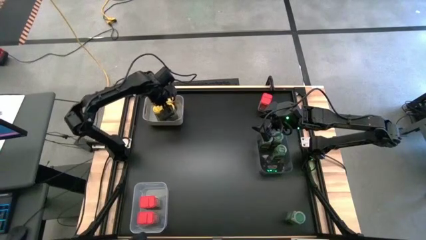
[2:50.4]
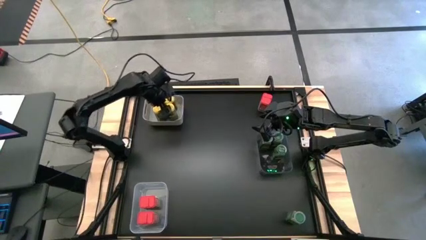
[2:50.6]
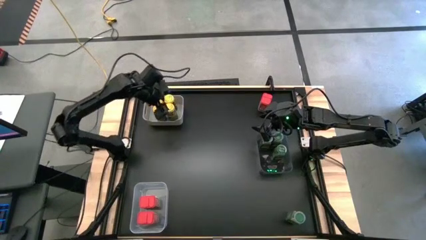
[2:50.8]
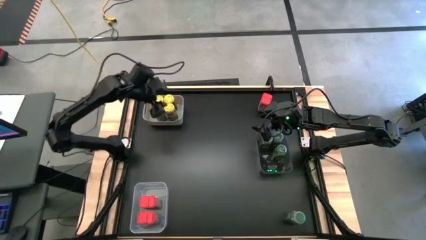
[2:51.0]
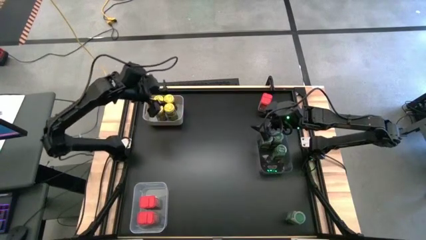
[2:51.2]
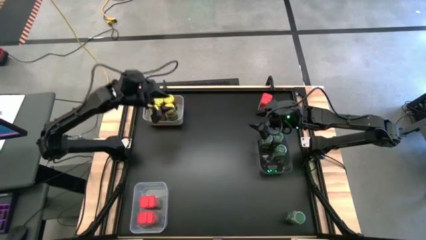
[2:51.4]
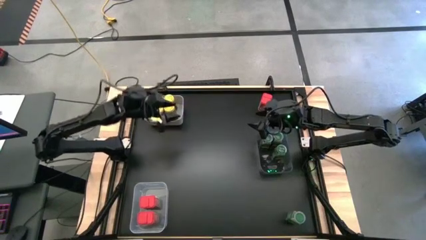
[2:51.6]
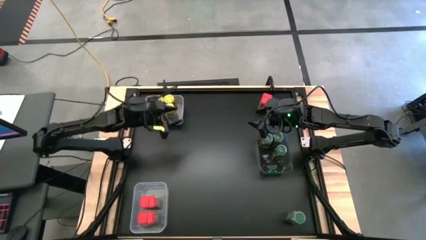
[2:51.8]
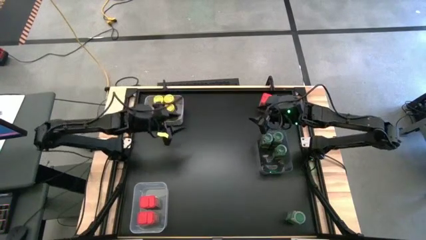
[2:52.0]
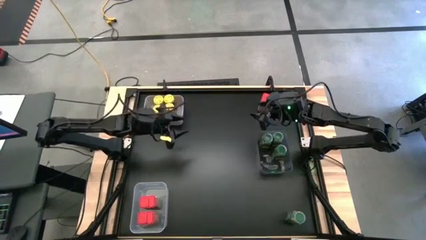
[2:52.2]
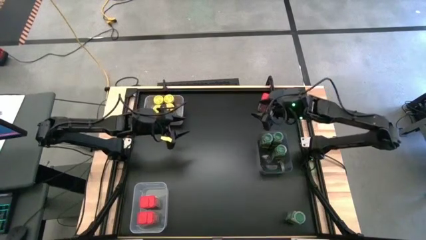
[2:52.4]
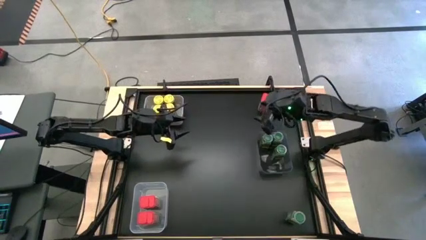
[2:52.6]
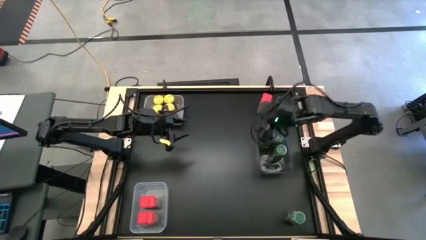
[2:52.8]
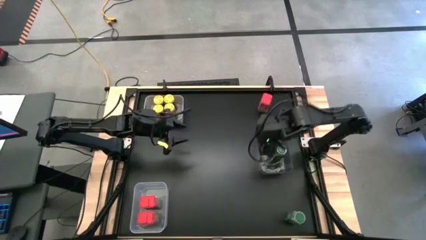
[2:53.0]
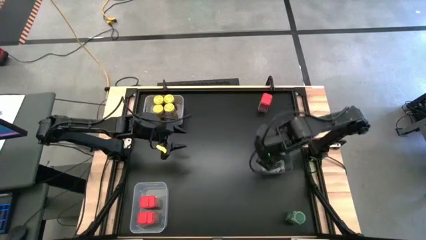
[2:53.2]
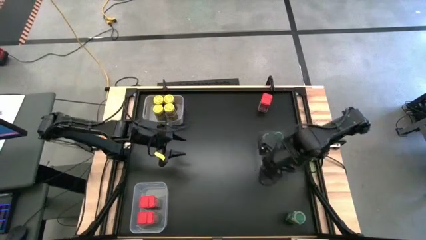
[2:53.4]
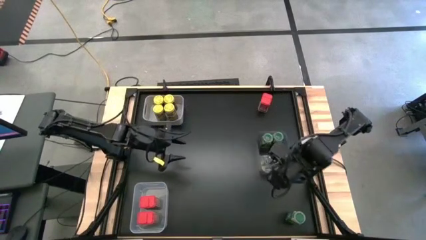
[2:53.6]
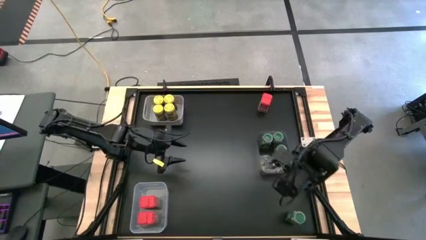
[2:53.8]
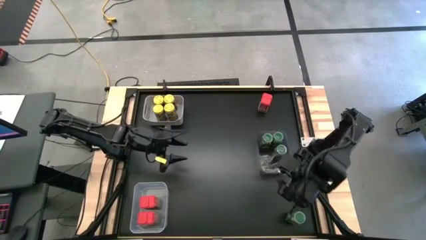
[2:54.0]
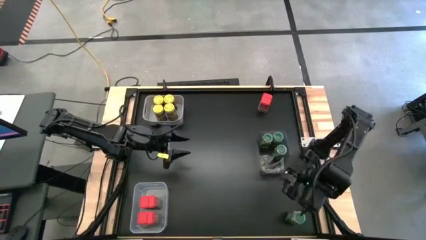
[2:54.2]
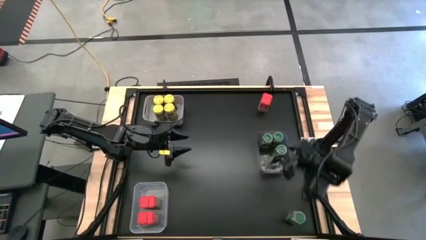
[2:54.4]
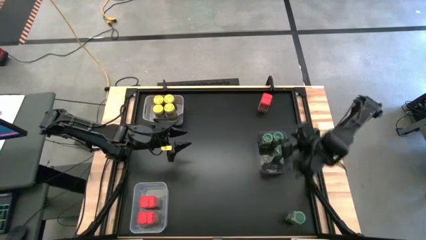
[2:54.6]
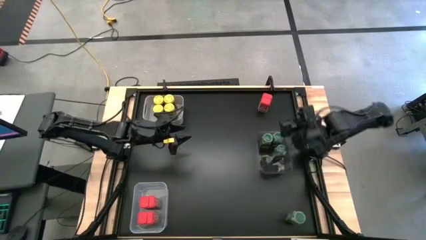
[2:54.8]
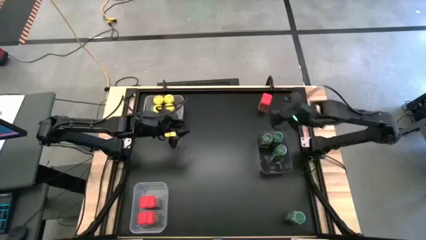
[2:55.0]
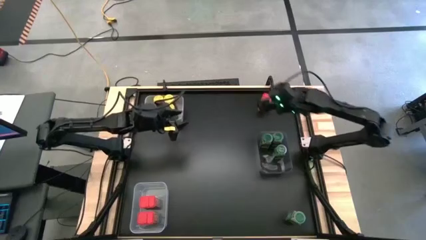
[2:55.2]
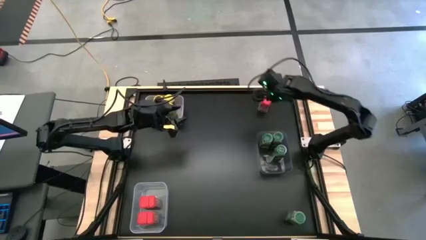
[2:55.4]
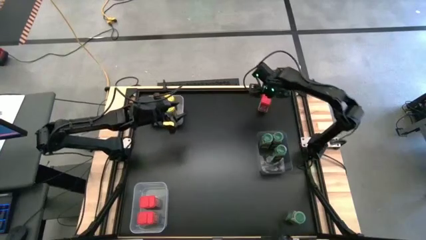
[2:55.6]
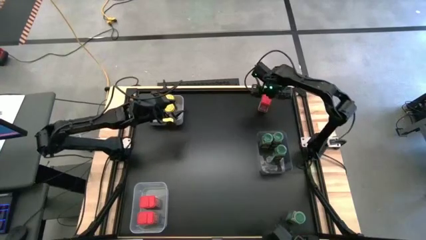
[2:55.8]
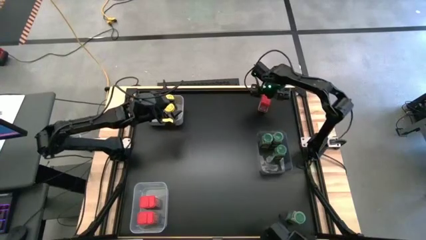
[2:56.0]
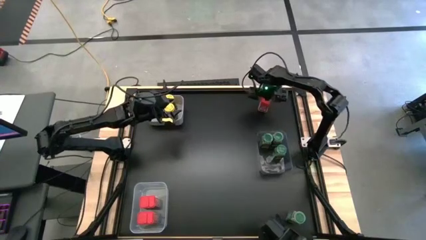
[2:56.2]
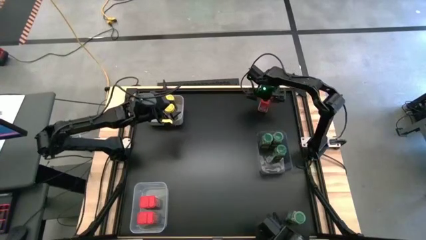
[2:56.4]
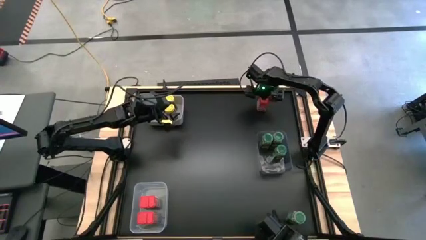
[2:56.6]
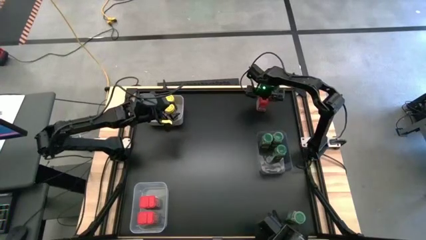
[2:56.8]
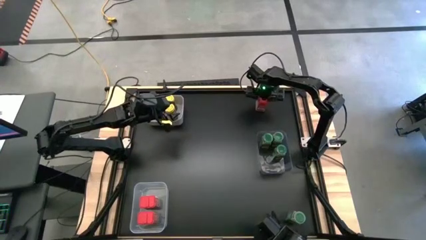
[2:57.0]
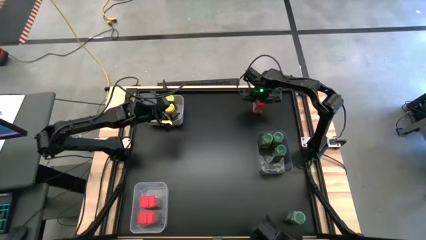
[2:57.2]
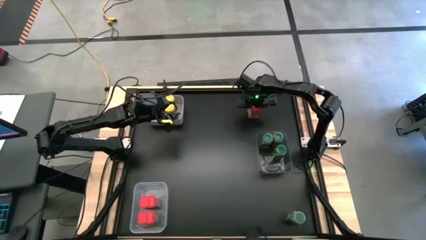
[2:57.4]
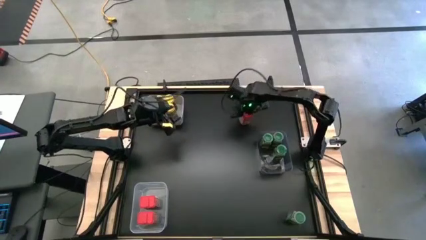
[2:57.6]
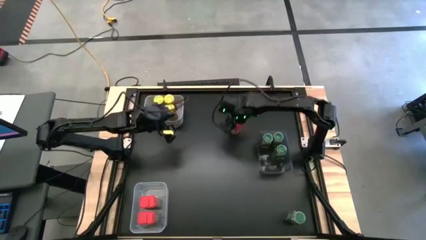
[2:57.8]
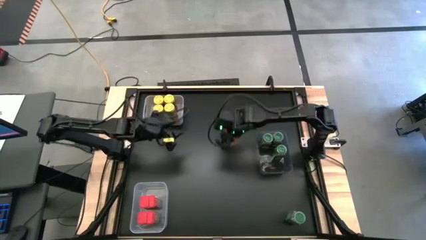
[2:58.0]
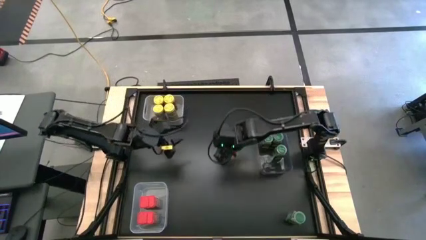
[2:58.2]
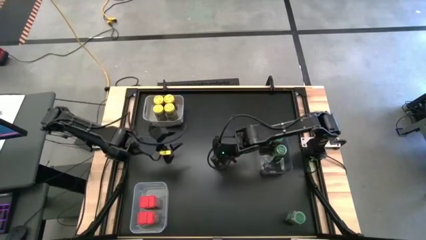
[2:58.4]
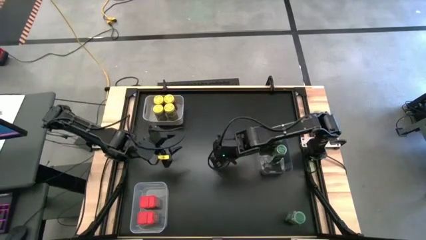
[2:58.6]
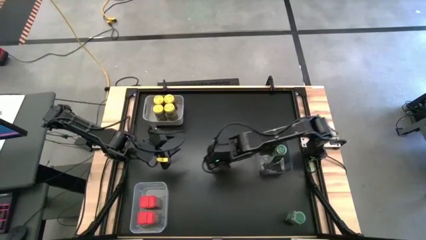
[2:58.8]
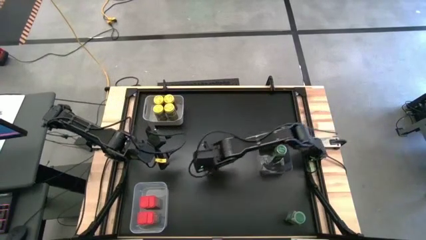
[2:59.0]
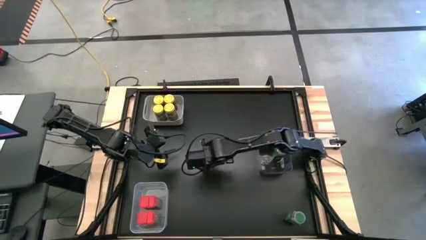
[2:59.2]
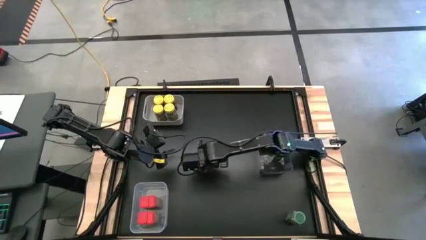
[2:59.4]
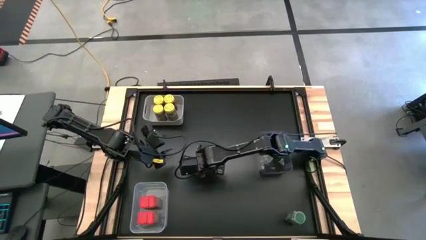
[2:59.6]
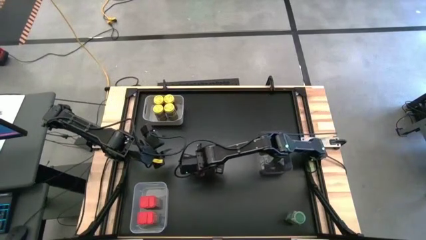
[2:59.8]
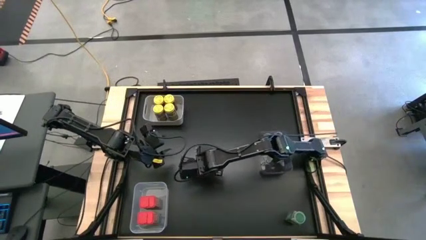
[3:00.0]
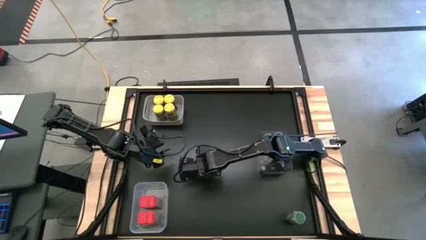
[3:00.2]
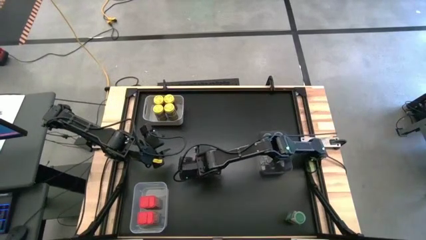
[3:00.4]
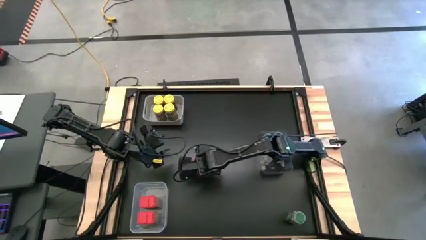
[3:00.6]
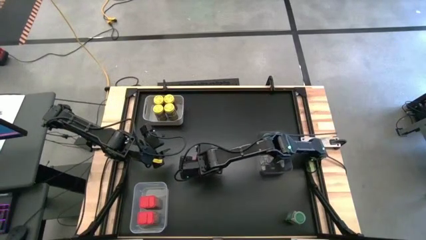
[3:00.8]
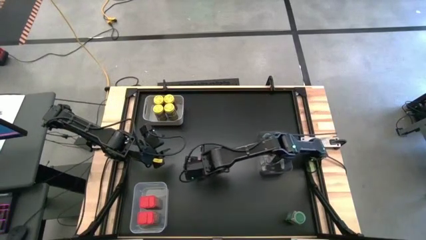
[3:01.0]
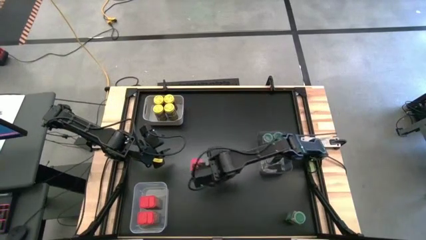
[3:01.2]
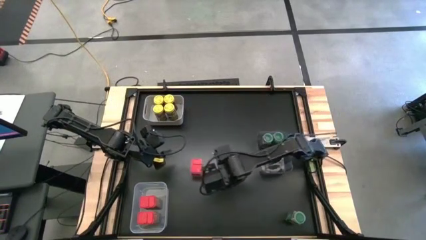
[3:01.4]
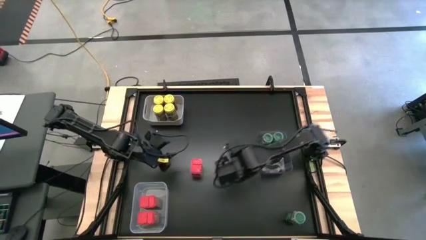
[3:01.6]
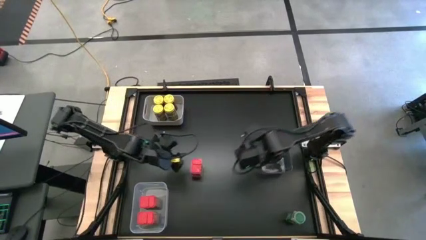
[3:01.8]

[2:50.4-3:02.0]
Task: Sort spices by type
Put the red seasoning can into the transparent bin

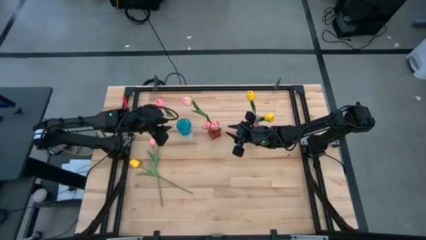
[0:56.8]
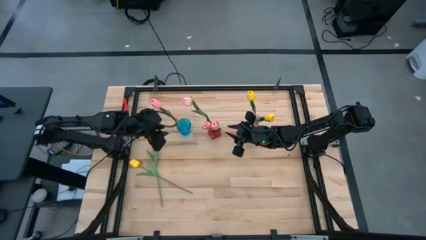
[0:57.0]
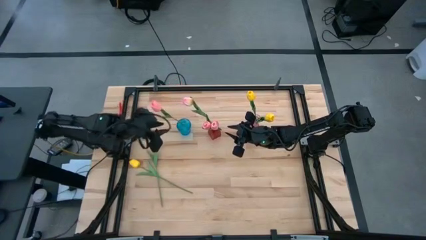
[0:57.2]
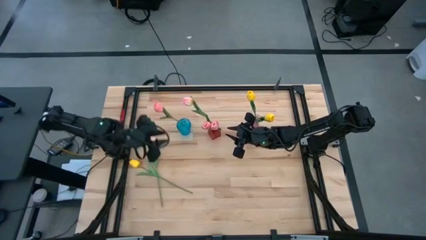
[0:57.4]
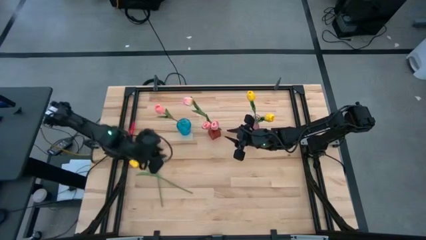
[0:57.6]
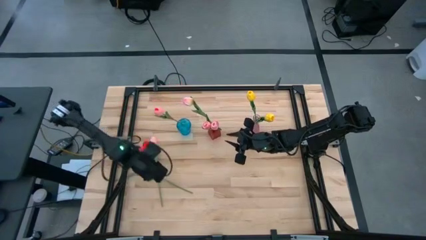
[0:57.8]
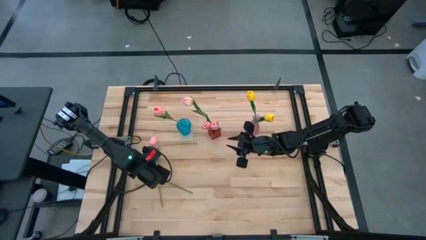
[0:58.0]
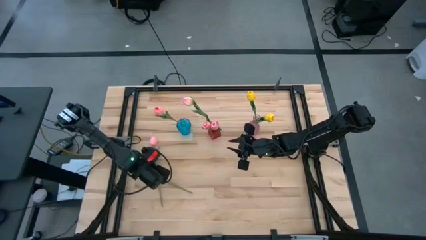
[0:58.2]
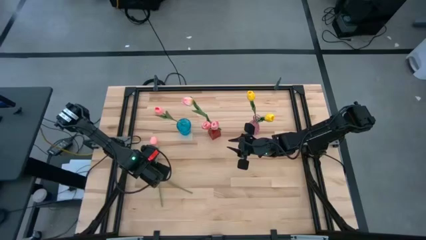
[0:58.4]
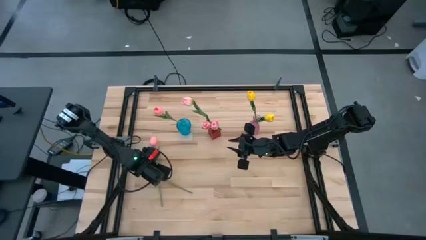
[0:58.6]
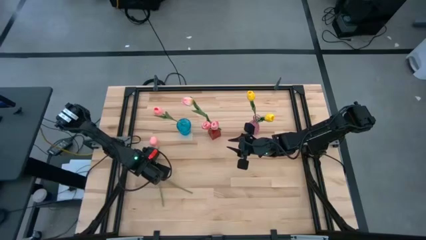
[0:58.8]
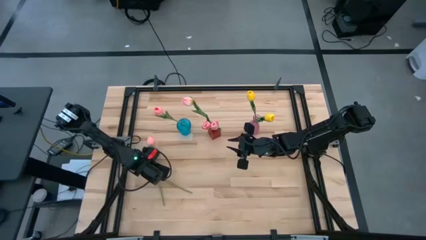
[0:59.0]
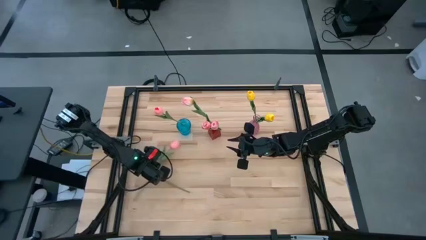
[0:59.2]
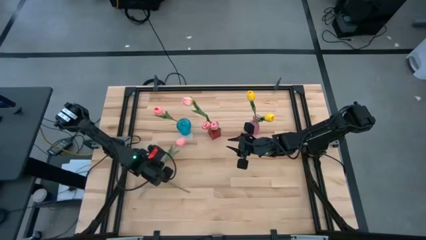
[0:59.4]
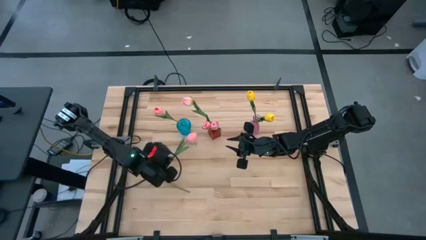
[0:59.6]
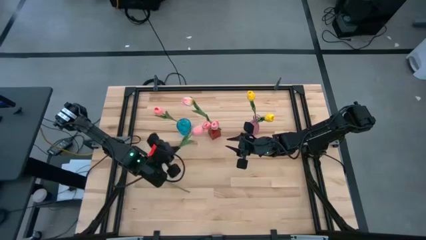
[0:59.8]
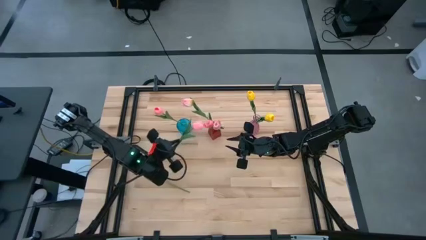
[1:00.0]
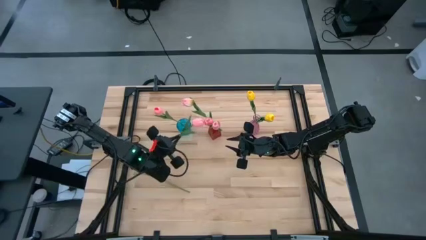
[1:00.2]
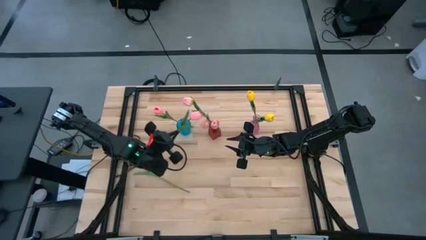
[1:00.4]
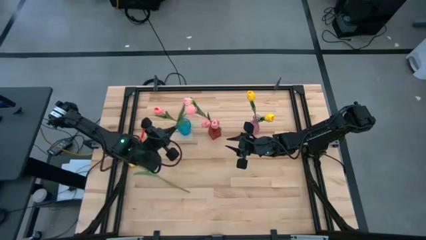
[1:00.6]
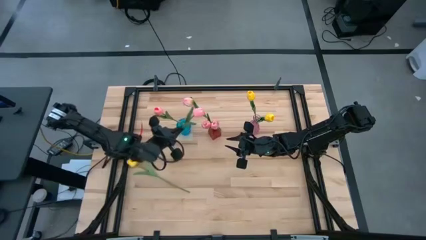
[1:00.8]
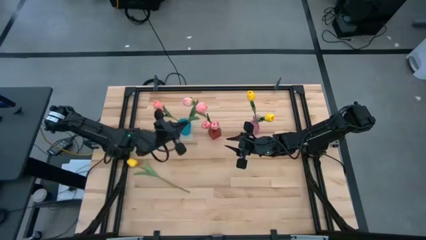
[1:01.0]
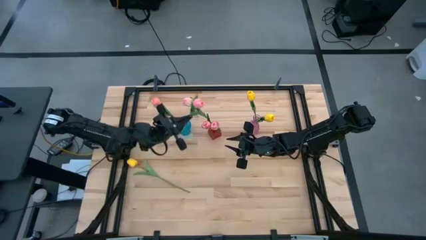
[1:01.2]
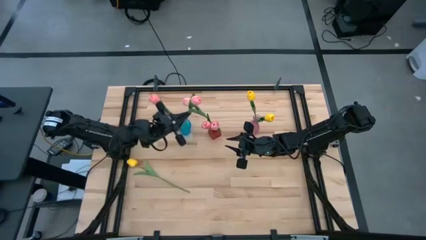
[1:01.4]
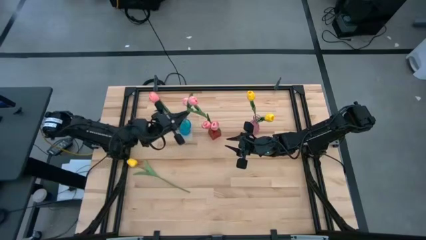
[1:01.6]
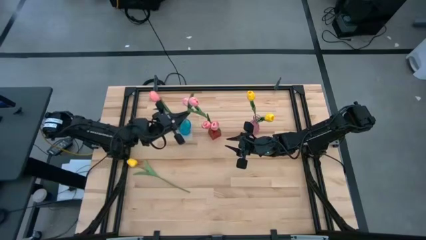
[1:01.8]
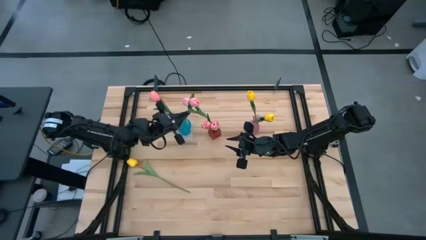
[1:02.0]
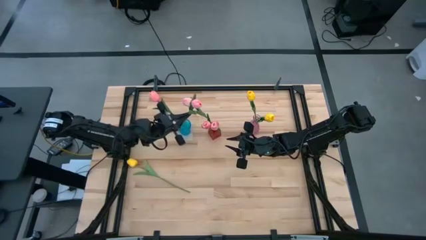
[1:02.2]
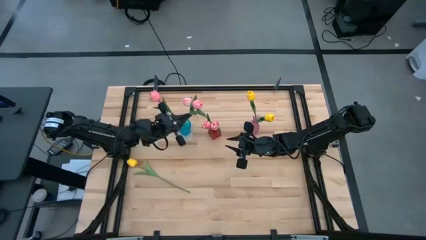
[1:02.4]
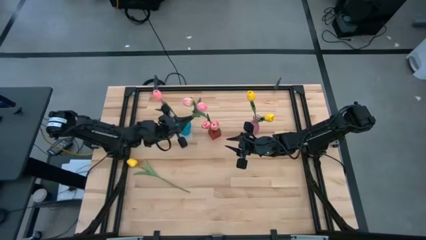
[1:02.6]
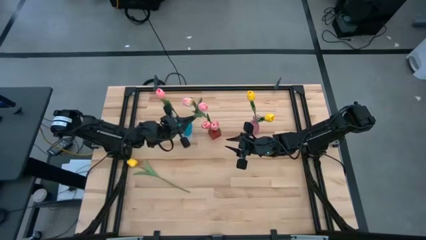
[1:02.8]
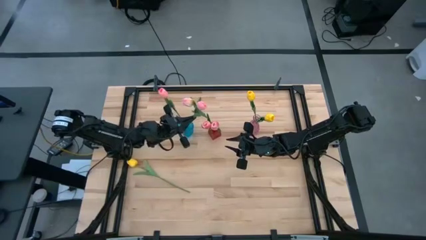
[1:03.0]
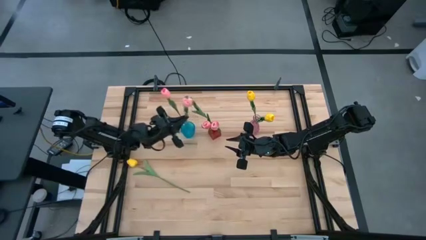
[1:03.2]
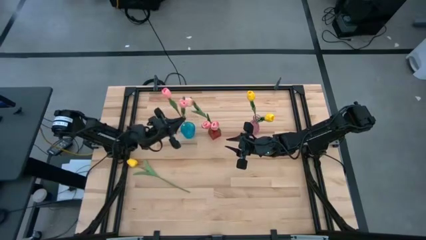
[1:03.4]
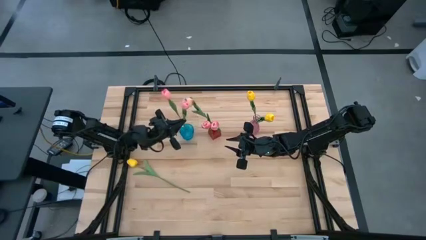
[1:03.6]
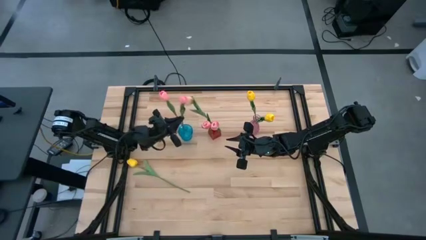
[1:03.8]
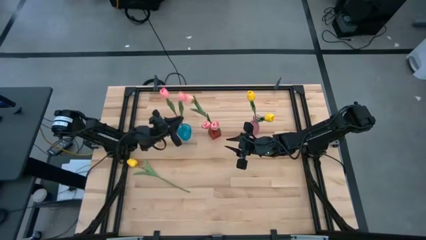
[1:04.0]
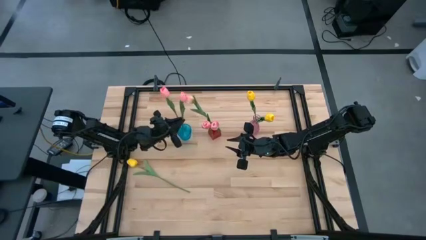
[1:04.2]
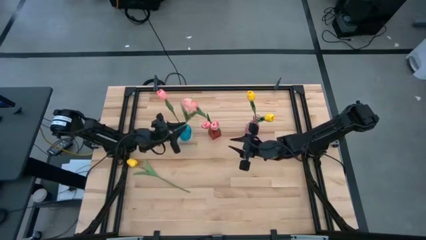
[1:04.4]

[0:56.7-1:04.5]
Task: Sort flowers into vase by color
Put the light pink flower into the blue vase
